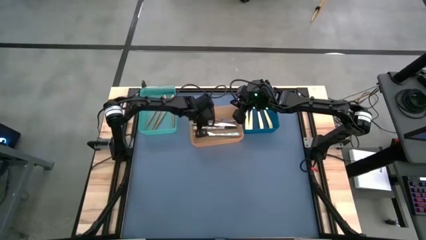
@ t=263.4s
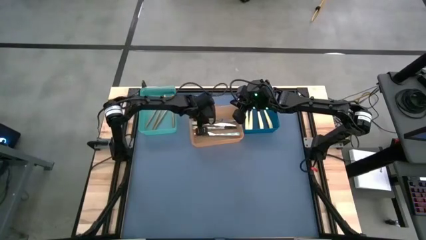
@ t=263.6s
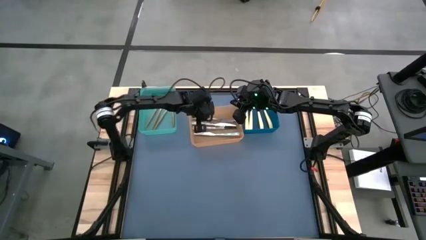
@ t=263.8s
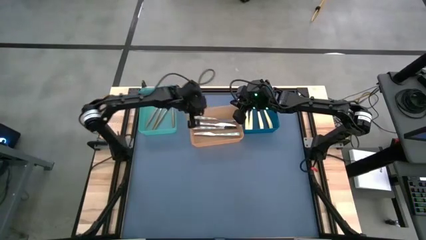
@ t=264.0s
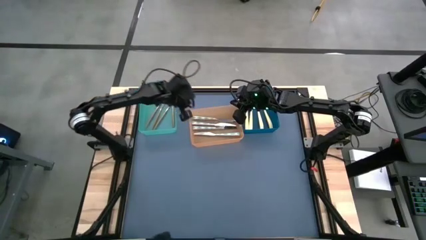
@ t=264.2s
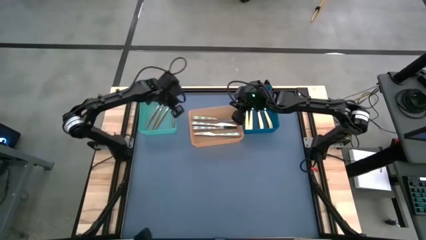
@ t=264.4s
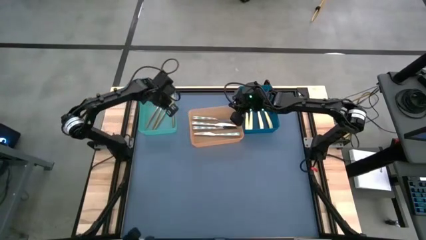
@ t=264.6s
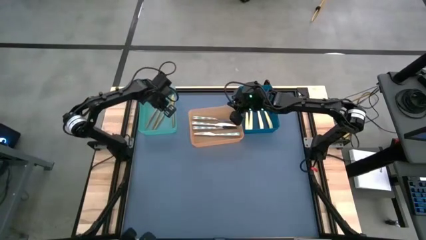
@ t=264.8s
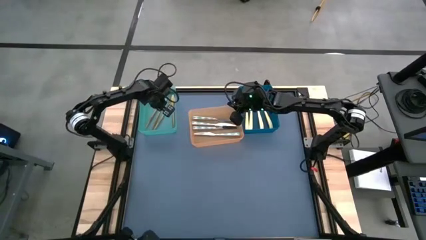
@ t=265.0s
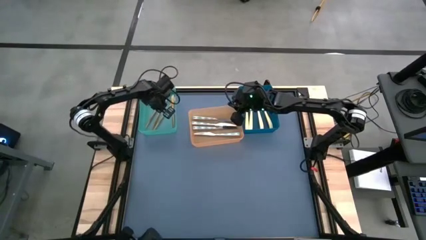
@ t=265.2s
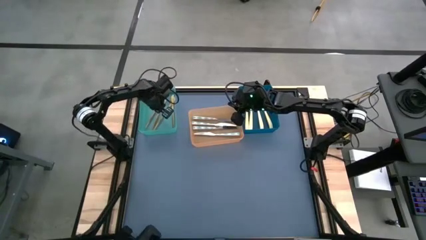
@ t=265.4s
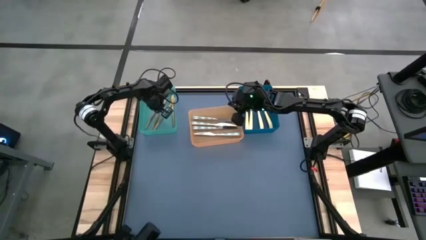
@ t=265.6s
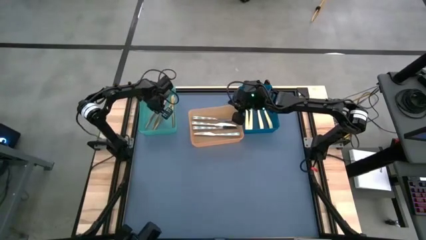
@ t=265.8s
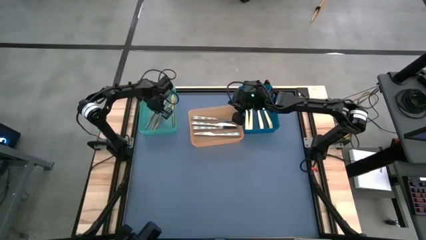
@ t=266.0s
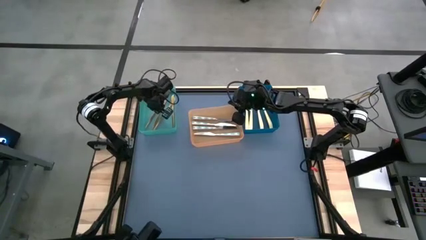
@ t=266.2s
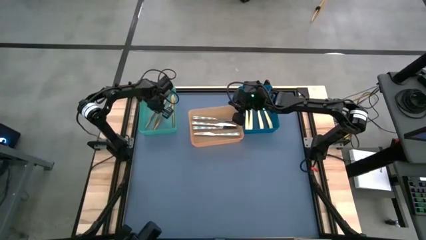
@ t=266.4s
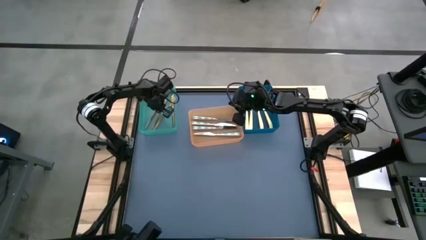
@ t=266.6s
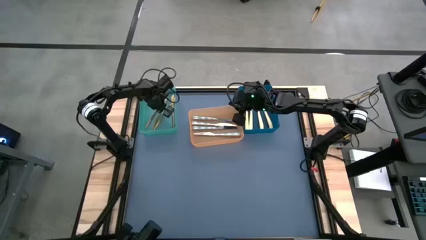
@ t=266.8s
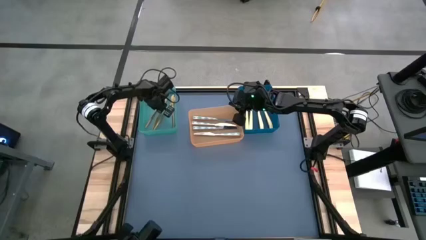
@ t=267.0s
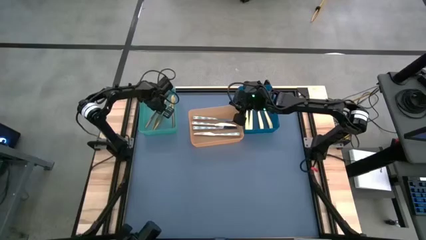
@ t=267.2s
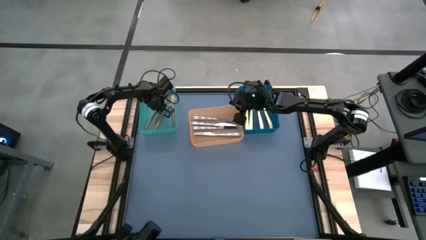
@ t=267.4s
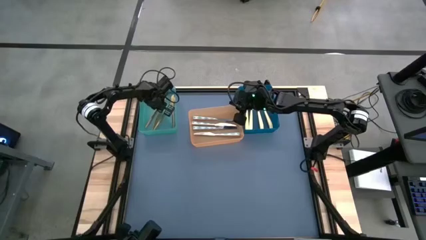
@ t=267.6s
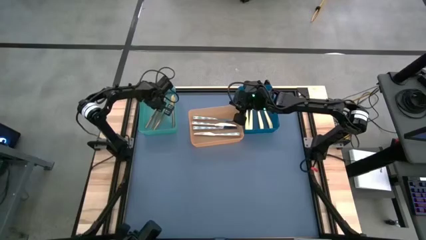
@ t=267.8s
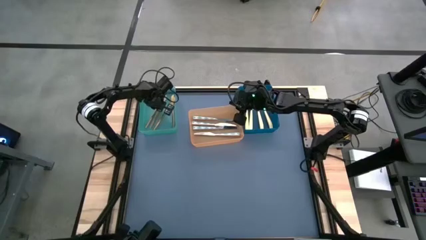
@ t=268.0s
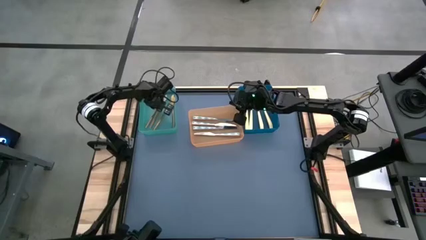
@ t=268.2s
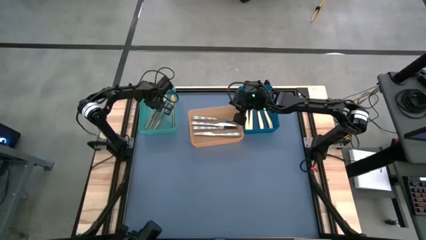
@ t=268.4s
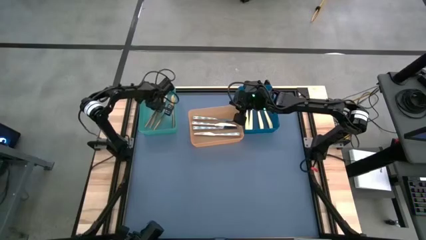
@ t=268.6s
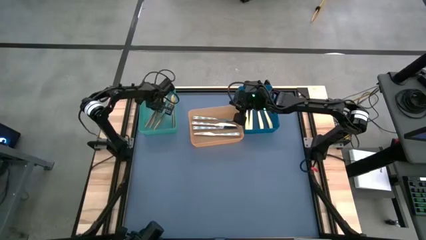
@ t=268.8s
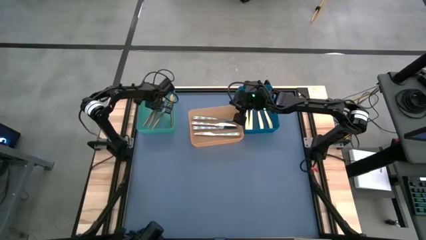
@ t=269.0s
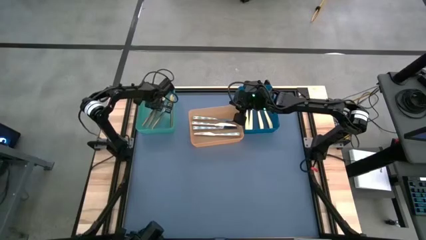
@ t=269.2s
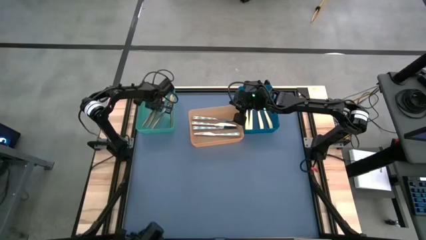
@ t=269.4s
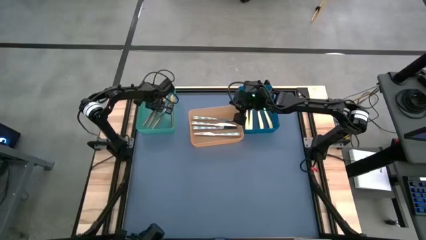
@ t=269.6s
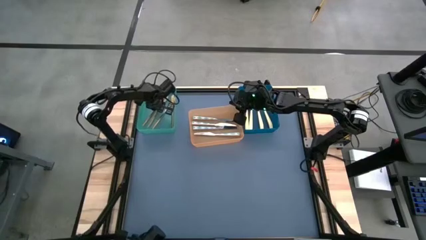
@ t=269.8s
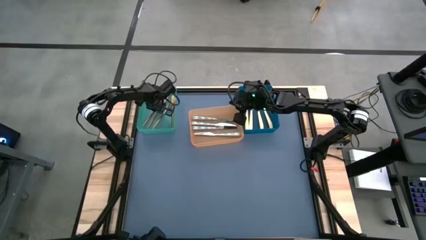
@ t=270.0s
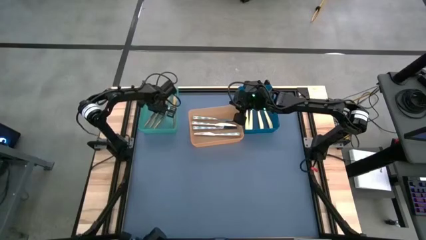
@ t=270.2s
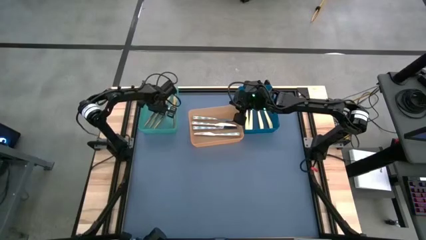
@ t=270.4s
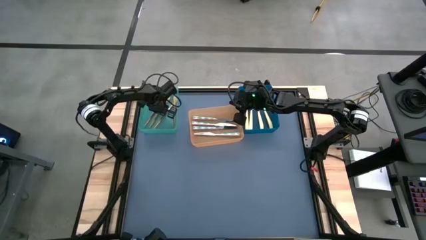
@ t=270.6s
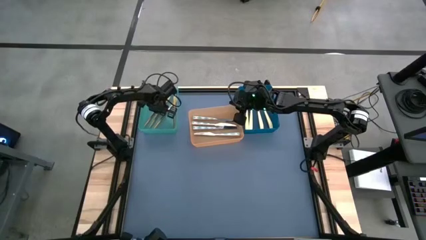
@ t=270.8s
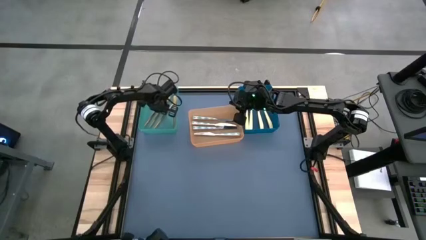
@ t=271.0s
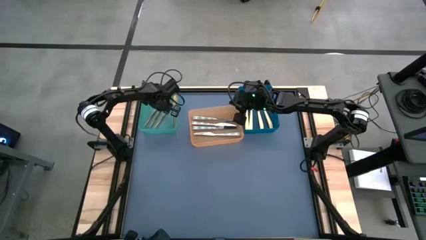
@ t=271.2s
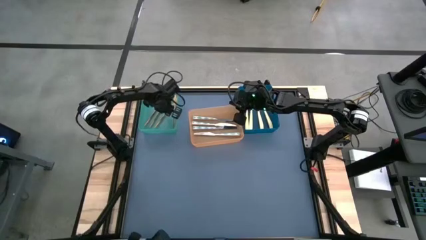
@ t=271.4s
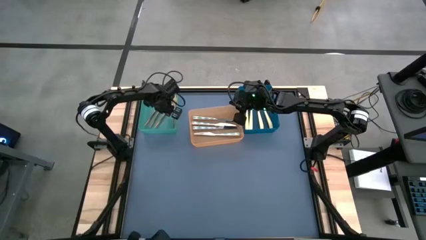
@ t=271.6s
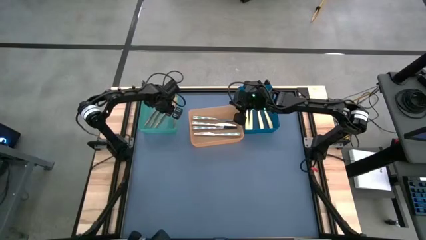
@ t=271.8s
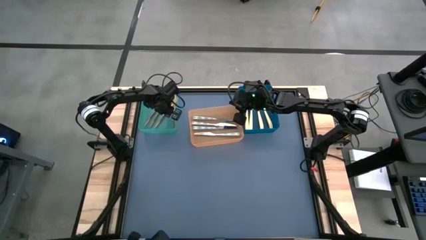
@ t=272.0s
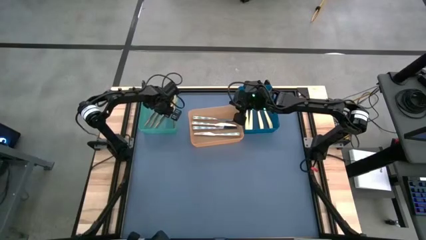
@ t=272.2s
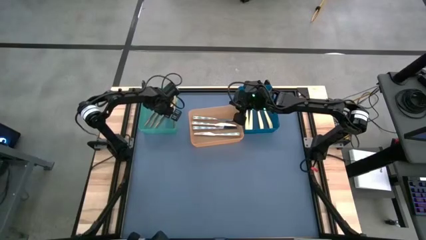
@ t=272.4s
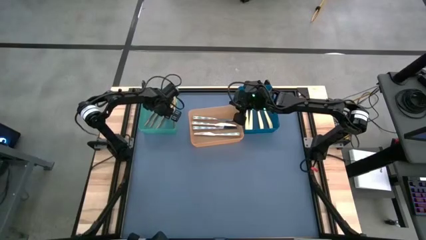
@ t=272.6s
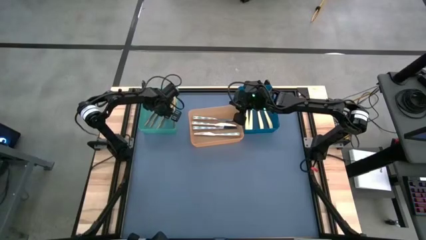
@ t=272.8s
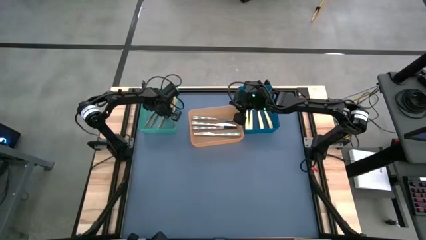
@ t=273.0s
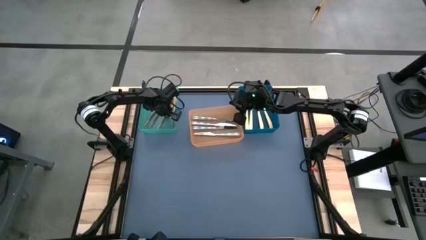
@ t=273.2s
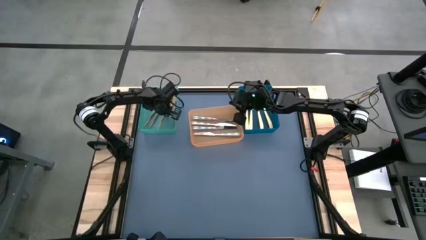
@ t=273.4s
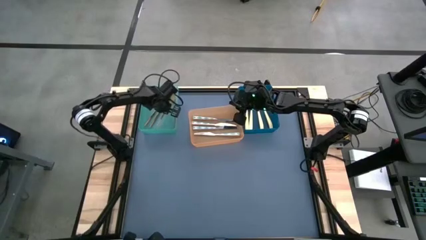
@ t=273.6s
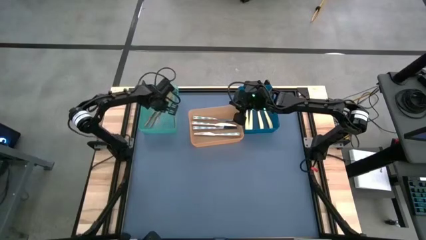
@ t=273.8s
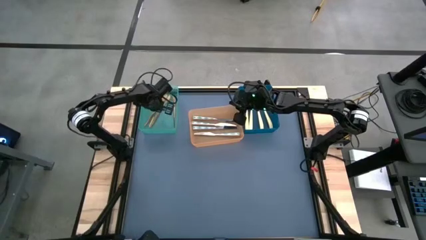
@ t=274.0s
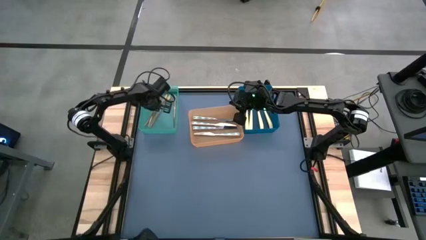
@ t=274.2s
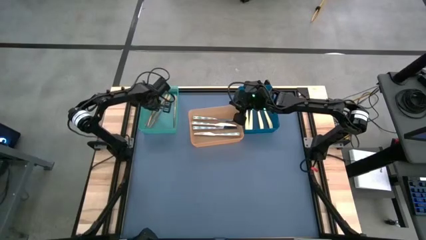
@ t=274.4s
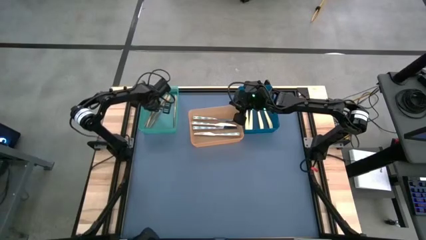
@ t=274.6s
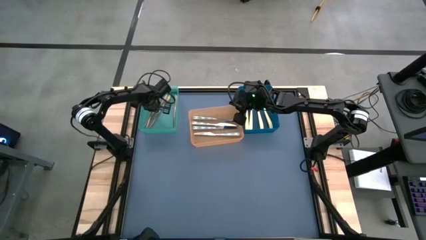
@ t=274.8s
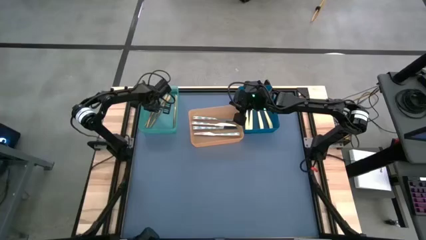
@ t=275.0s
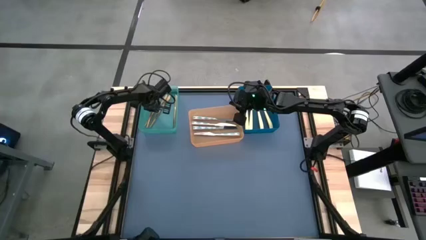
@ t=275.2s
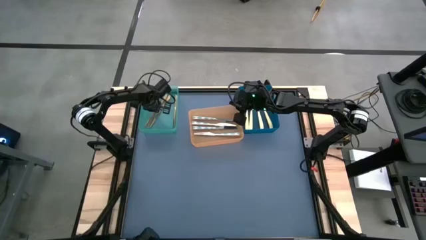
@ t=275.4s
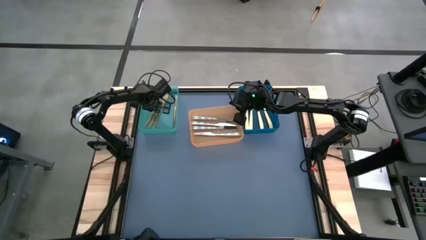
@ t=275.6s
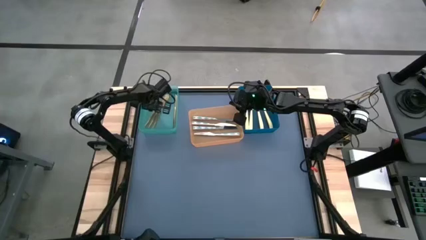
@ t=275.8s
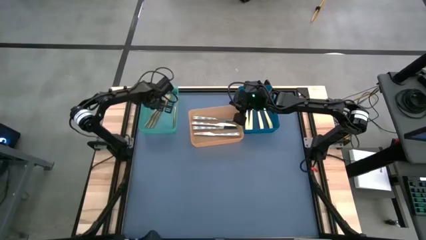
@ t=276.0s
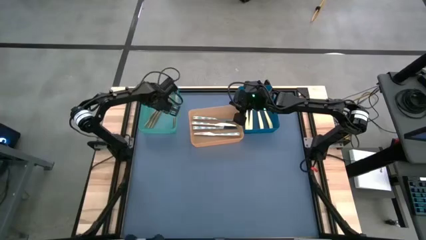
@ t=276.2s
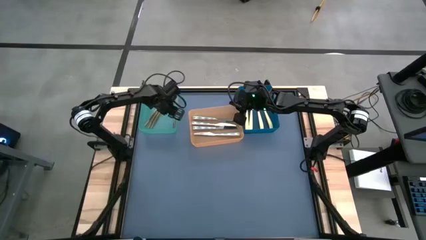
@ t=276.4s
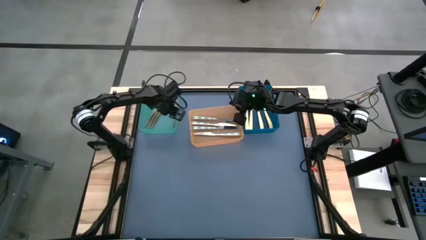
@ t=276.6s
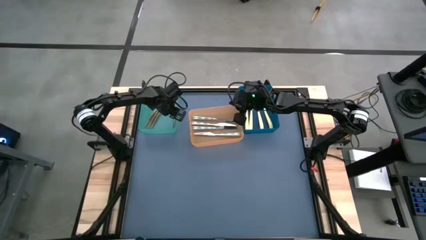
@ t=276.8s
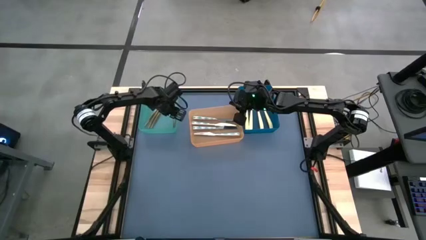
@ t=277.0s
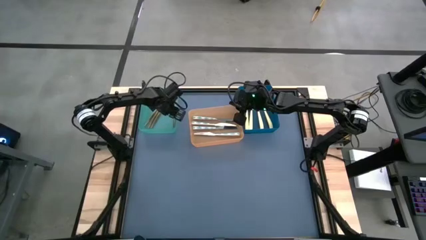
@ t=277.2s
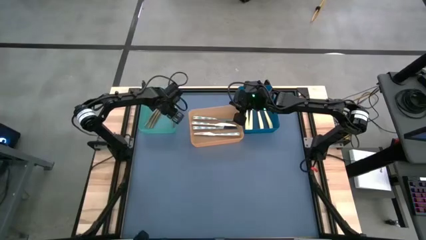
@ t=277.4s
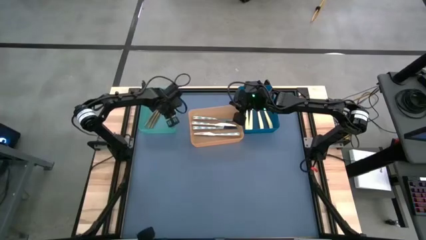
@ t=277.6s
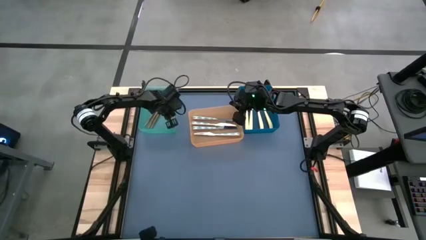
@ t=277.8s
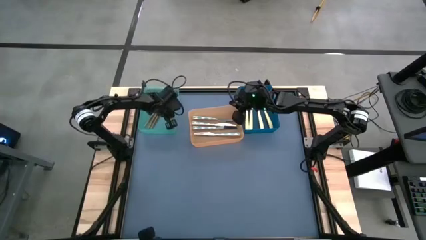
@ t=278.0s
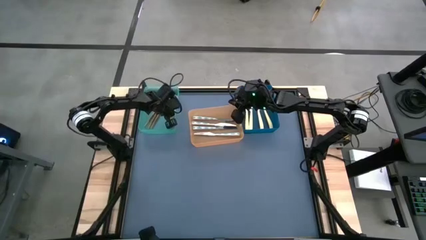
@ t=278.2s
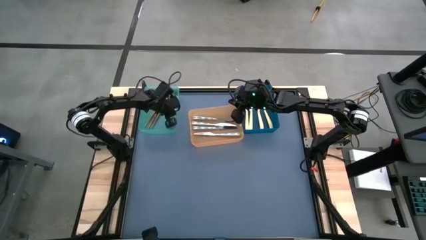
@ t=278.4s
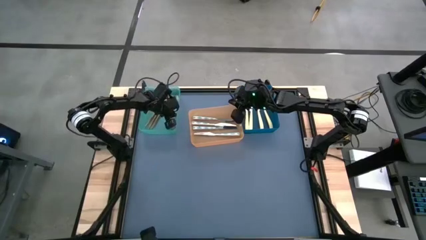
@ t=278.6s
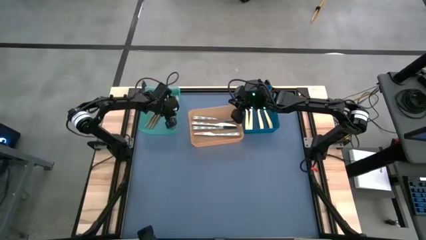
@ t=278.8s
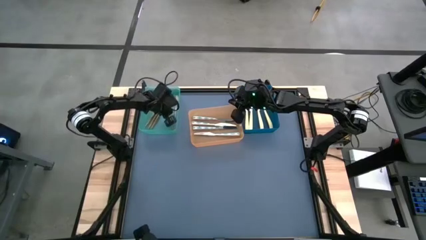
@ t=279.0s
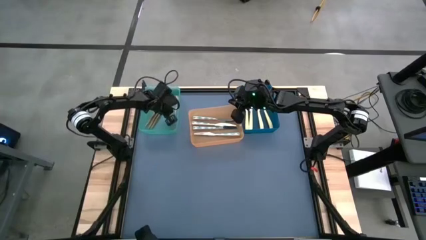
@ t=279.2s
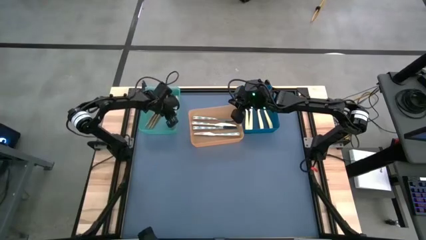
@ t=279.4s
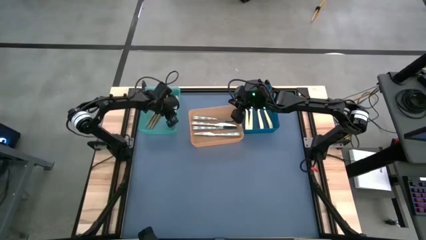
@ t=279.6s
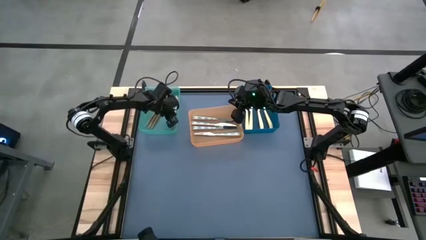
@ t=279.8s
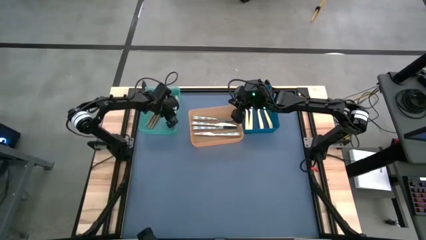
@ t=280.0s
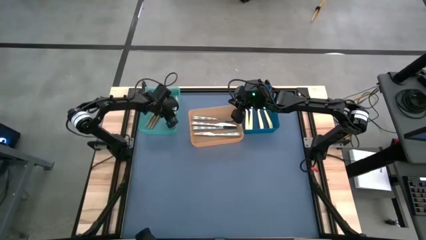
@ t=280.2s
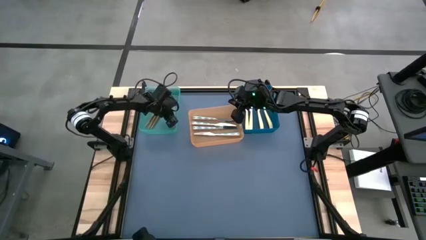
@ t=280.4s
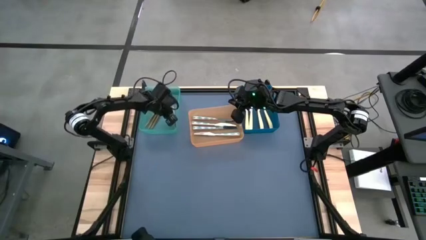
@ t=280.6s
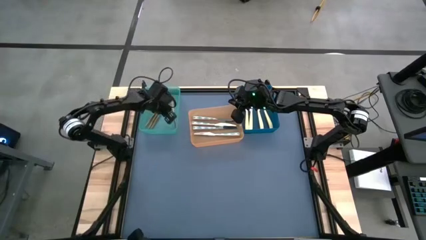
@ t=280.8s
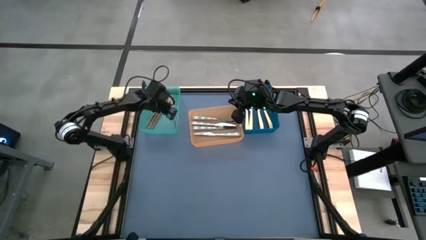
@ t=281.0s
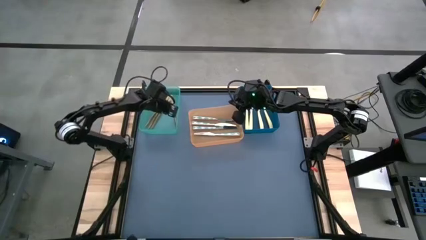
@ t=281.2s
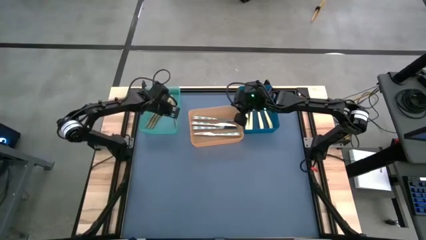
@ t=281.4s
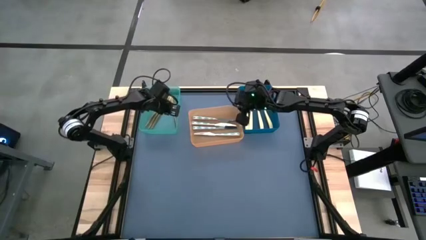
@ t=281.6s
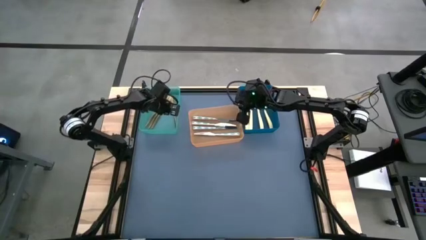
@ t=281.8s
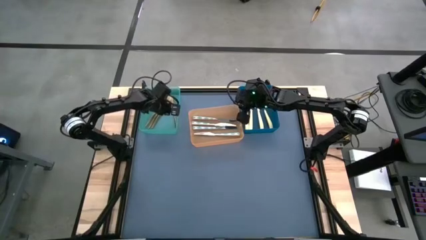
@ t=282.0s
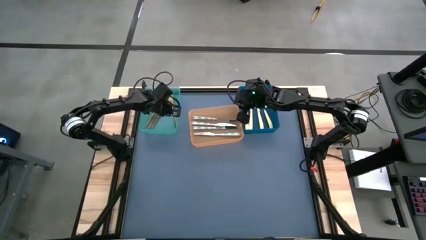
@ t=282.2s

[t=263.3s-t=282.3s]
Task: Sort silverware by color (type)
Adjust the gold knives in the green bin
